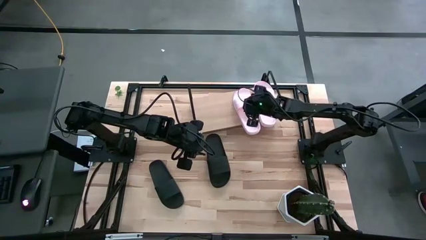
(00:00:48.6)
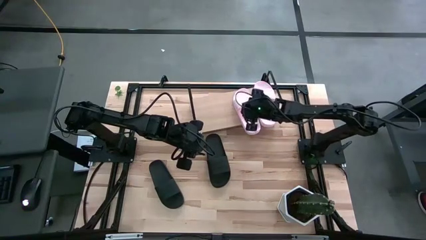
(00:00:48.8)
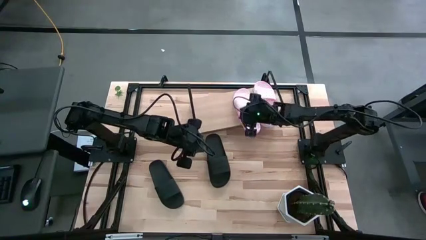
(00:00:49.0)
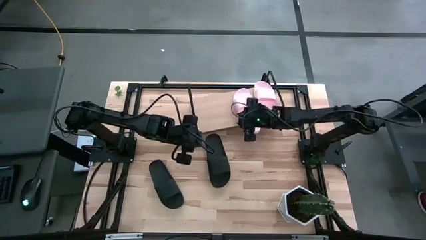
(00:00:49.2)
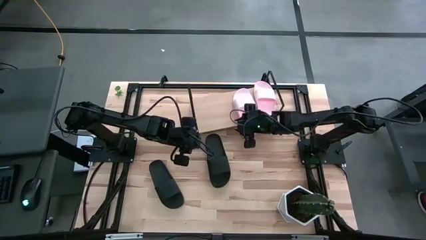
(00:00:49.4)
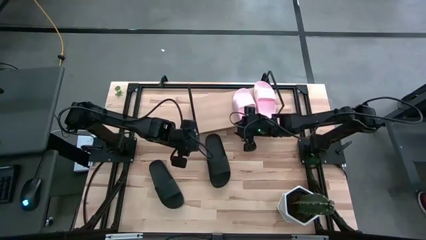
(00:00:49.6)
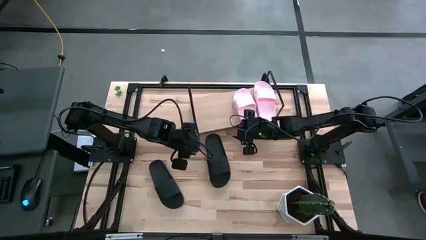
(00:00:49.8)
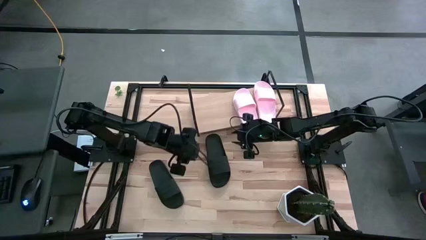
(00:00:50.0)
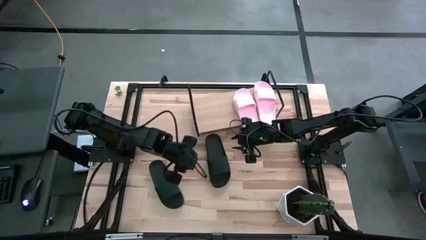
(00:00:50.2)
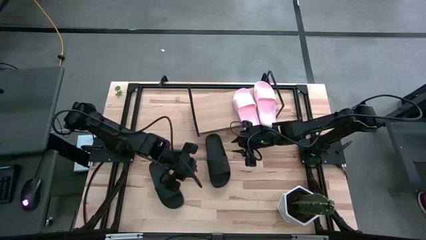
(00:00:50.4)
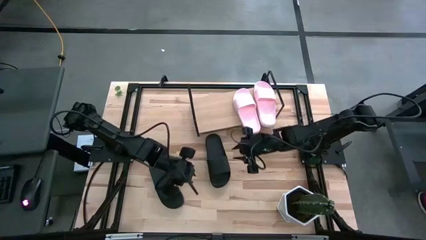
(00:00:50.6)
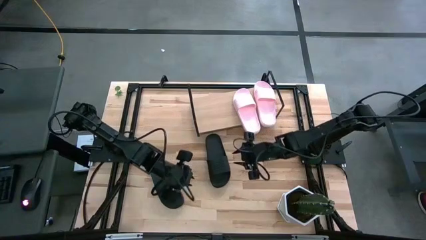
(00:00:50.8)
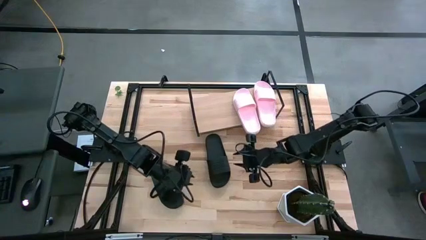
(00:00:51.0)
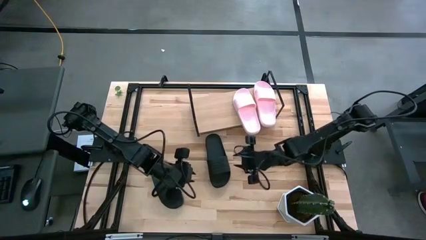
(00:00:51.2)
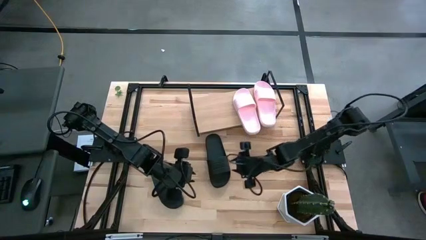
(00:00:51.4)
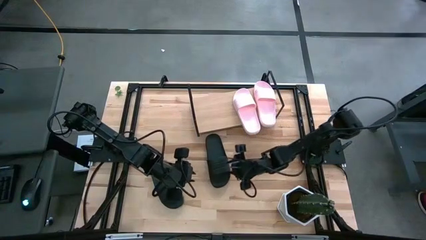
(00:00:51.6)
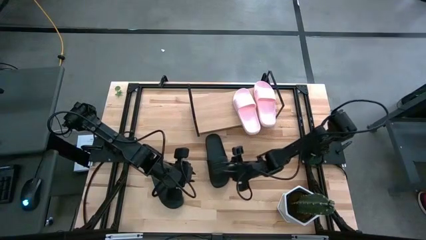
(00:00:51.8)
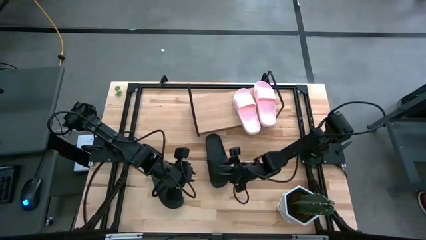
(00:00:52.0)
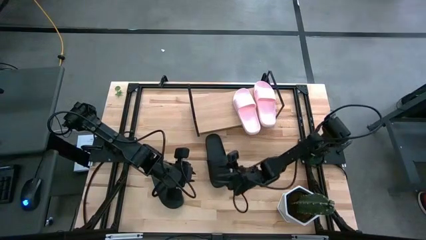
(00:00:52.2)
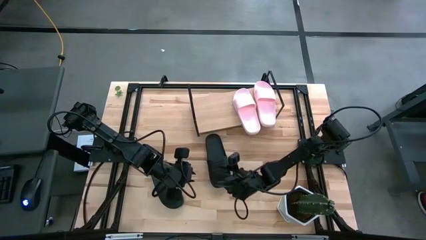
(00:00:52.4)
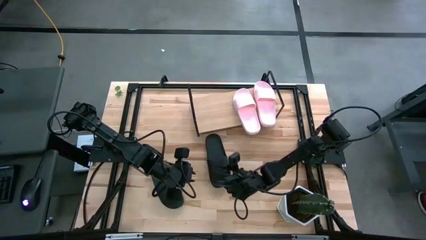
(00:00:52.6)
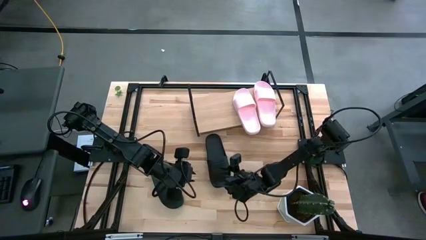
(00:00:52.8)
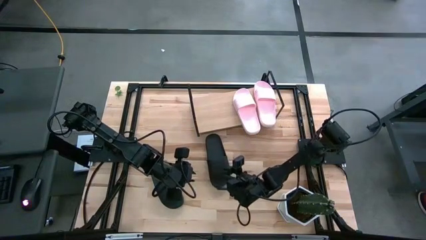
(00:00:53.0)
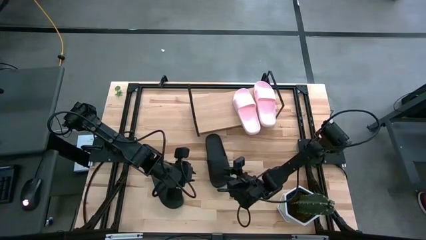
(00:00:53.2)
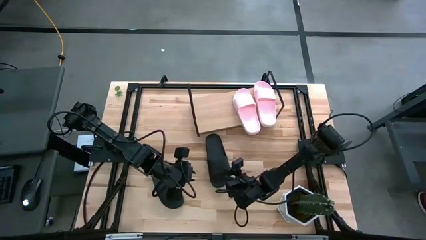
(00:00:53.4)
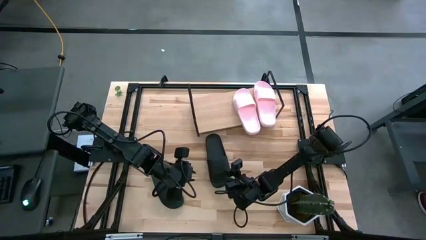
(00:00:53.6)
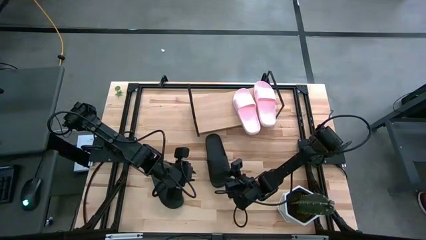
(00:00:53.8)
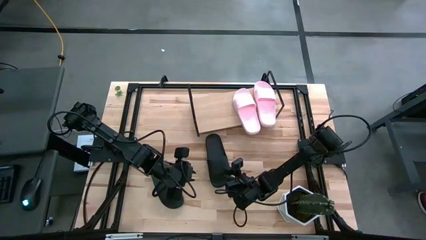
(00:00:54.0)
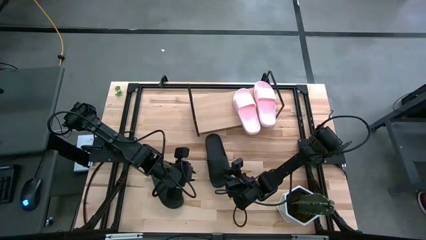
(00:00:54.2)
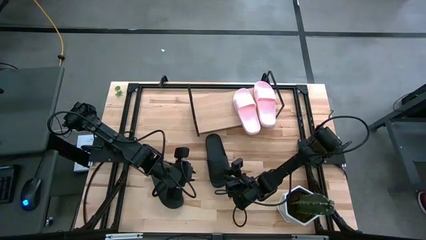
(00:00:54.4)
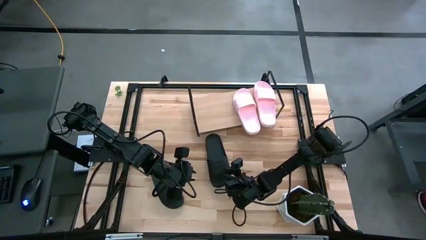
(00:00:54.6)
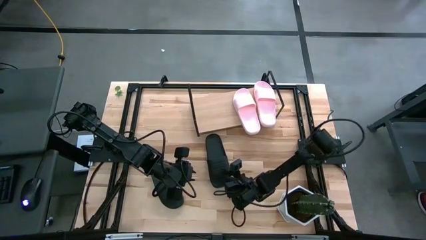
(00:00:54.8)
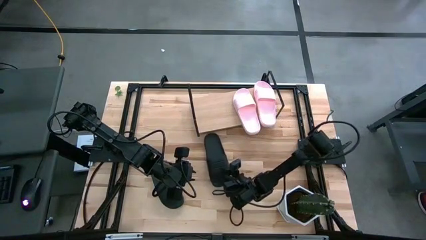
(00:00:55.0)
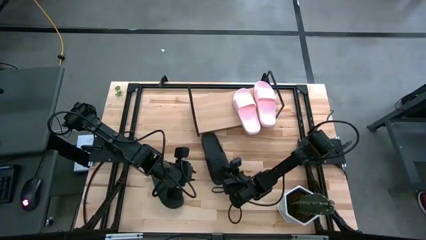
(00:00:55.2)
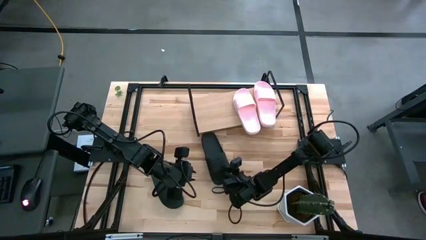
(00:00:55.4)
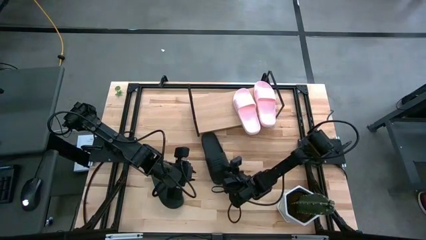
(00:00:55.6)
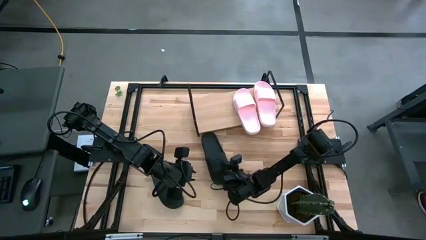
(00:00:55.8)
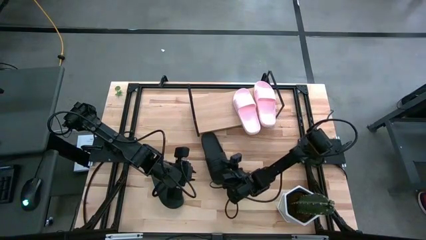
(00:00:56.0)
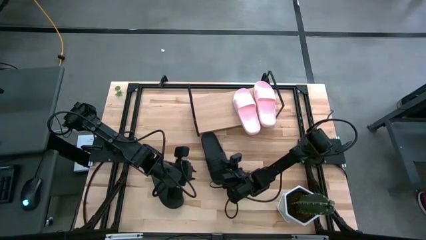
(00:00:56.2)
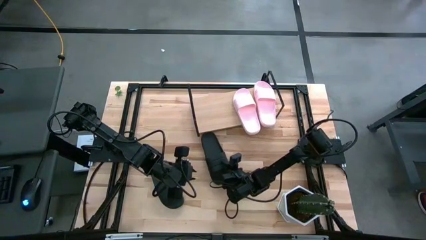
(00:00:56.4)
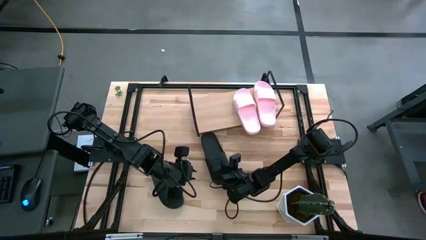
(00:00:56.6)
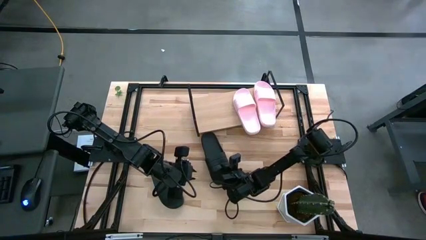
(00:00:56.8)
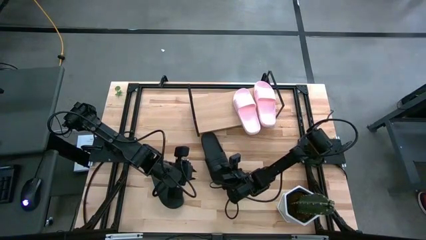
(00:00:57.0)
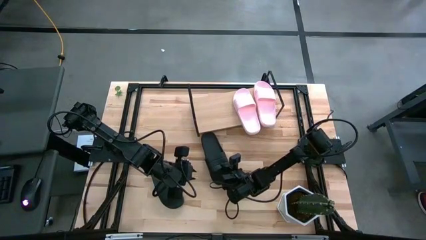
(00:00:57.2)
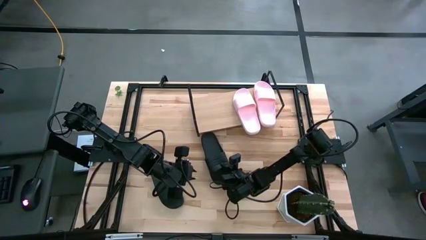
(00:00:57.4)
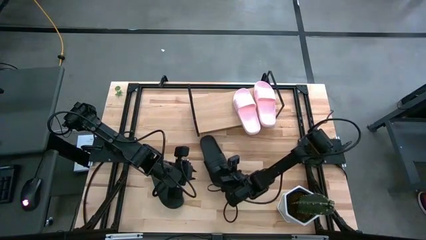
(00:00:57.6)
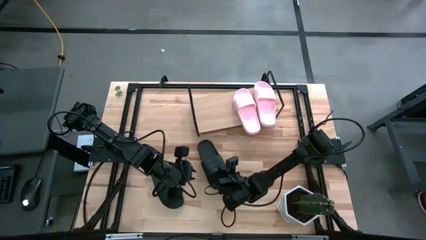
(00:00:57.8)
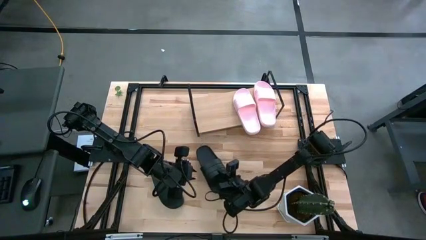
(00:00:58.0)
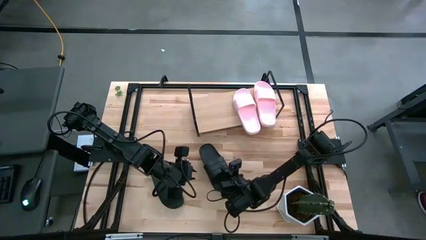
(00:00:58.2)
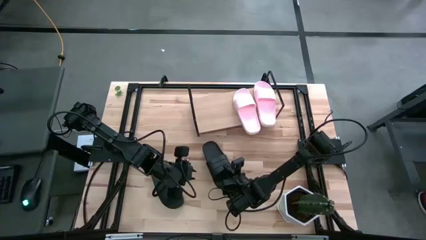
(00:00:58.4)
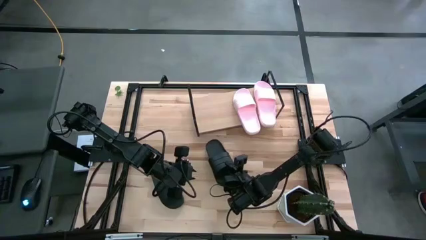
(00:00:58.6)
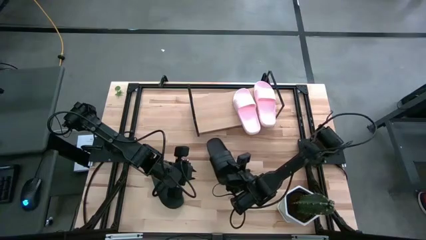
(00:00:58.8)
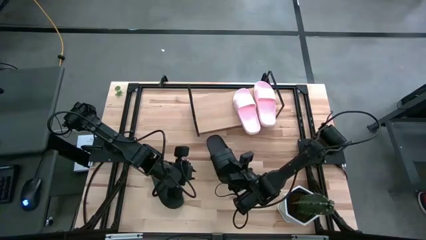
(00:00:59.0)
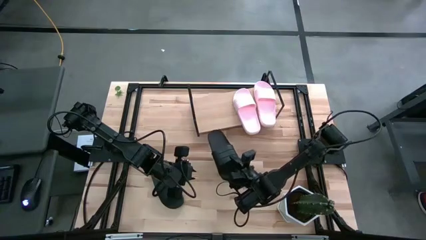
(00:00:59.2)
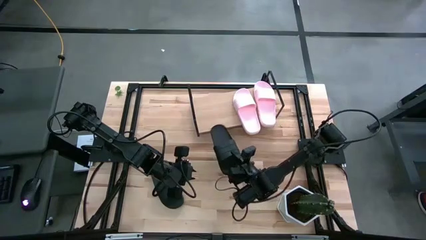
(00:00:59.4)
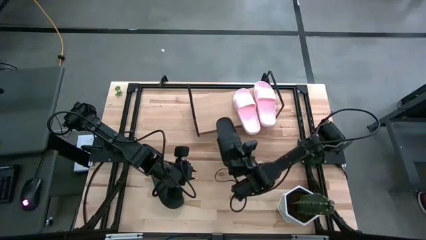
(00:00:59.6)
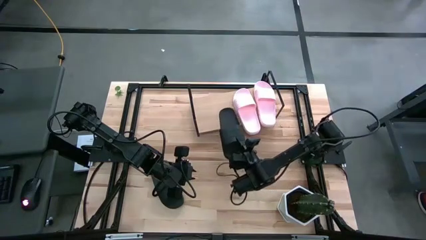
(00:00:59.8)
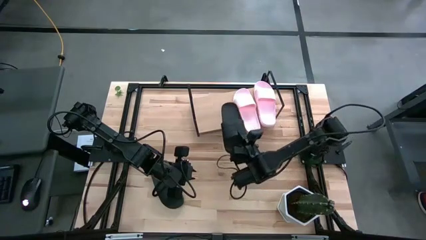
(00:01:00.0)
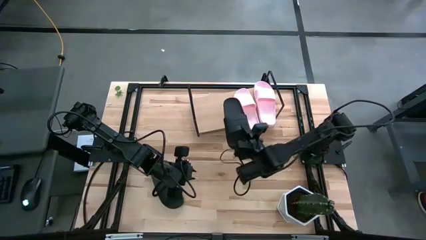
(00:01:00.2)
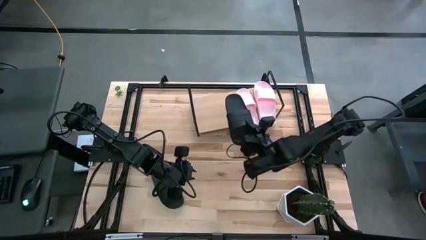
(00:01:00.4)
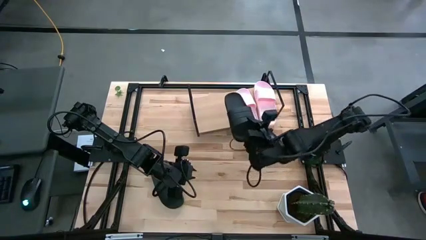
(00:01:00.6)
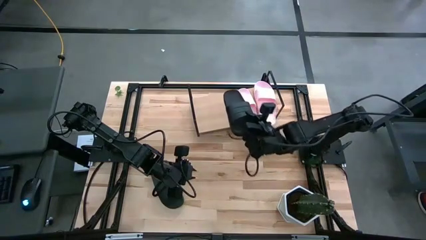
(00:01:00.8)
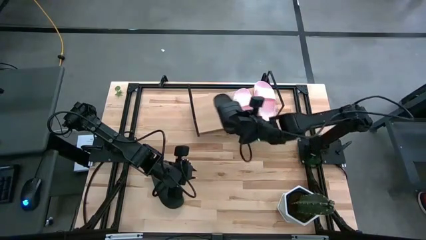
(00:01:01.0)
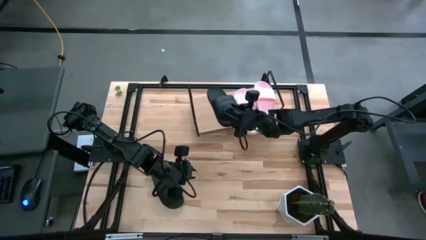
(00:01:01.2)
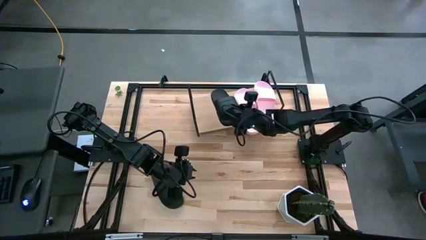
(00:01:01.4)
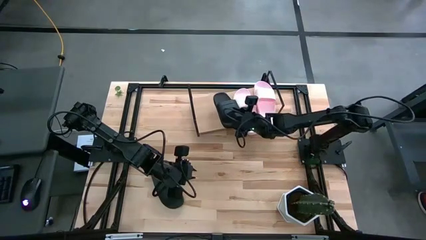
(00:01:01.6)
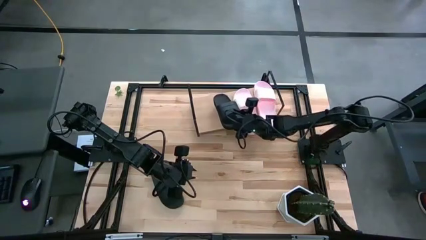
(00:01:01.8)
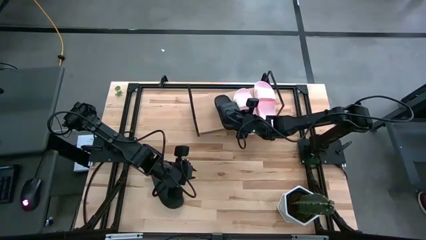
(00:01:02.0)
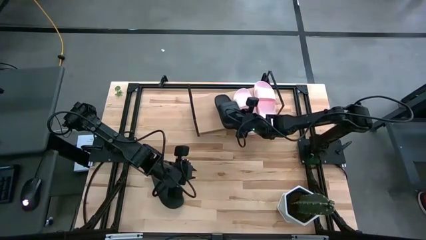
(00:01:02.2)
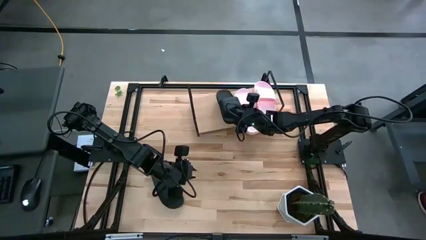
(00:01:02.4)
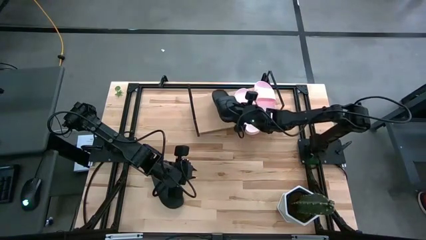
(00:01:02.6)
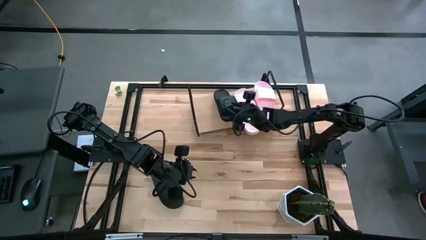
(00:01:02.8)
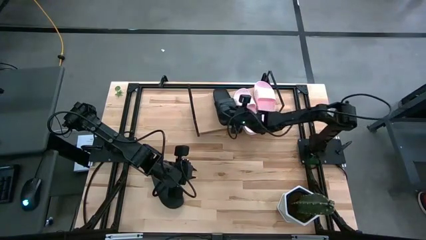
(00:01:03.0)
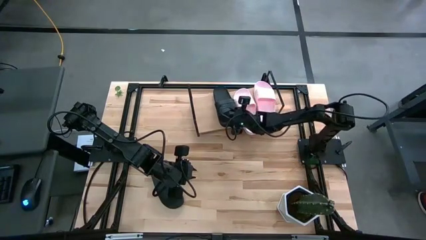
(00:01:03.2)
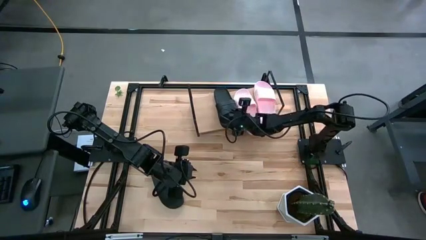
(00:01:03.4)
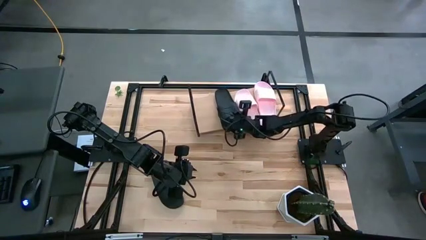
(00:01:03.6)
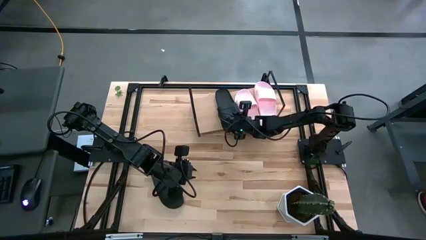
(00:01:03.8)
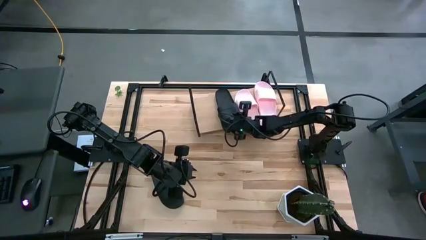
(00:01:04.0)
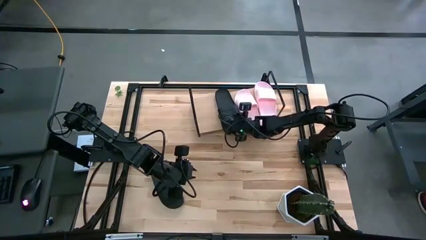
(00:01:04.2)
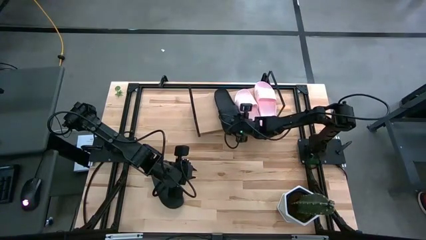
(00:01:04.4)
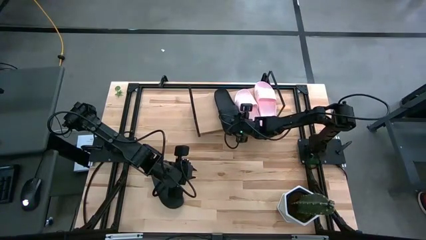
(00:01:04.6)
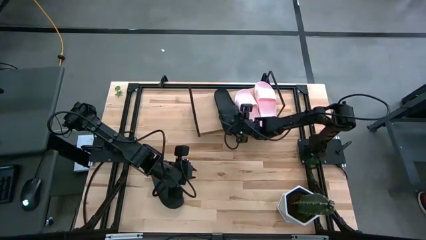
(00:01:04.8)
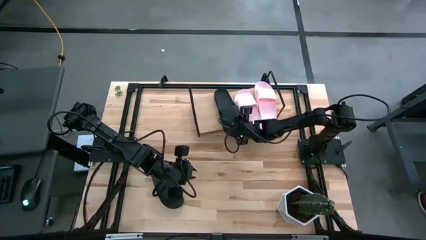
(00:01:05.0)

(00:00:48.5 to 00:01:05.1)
Task: Pick and place slides into the shelf
Put the right black slide on the shelf
